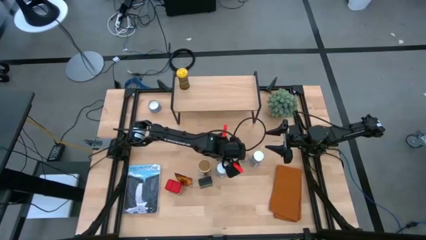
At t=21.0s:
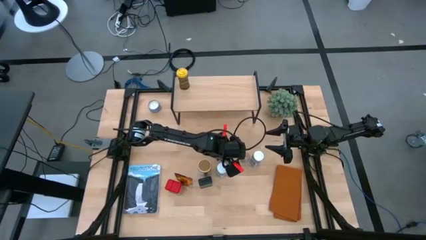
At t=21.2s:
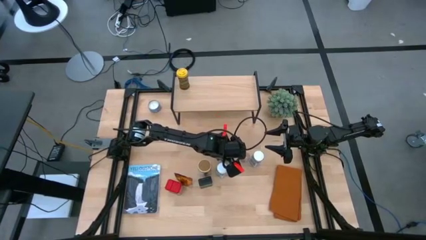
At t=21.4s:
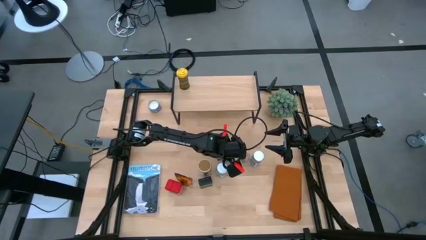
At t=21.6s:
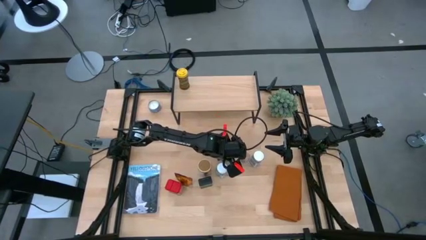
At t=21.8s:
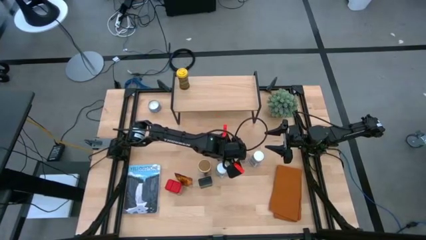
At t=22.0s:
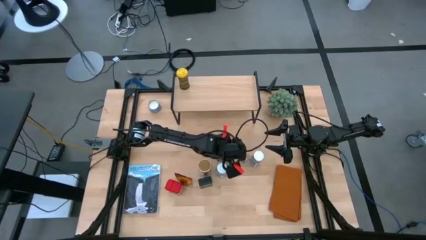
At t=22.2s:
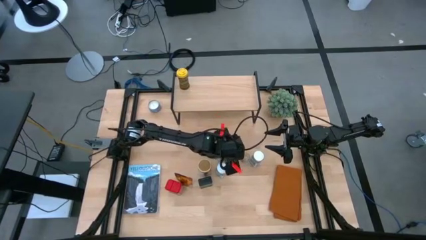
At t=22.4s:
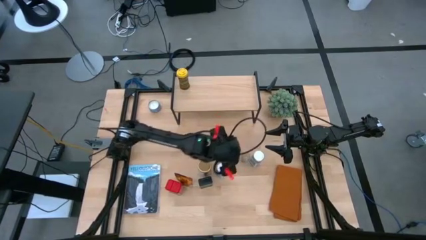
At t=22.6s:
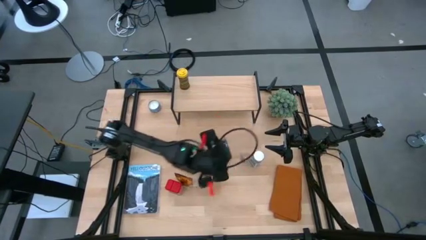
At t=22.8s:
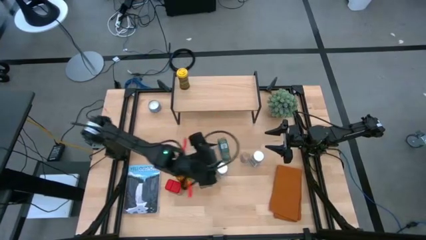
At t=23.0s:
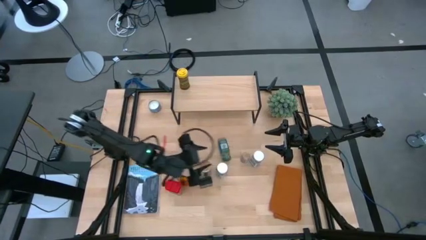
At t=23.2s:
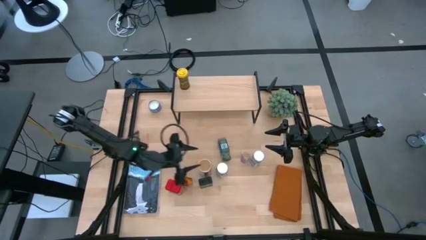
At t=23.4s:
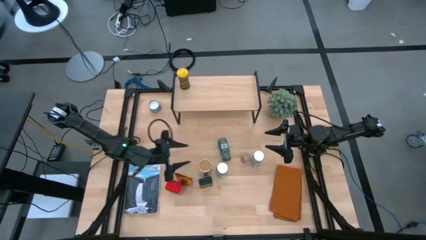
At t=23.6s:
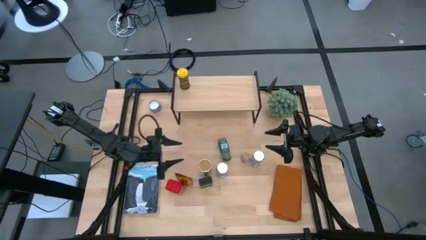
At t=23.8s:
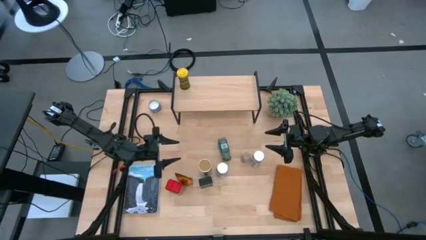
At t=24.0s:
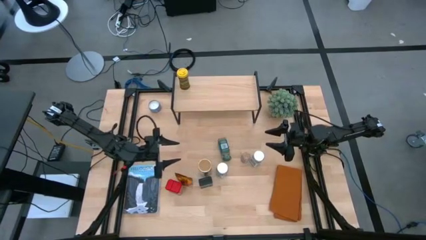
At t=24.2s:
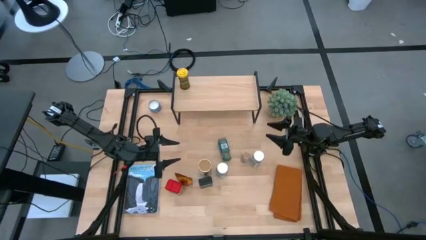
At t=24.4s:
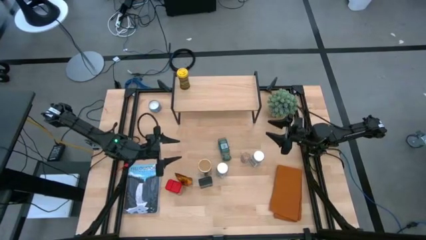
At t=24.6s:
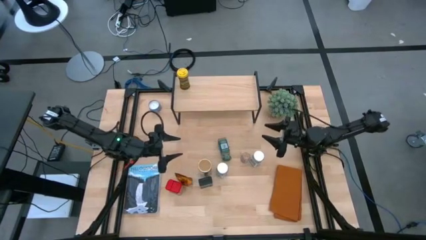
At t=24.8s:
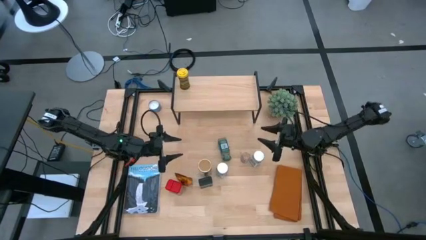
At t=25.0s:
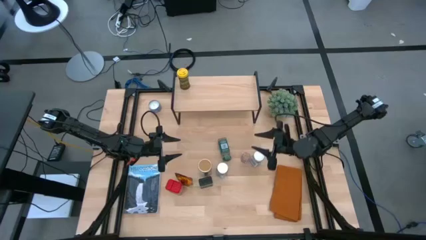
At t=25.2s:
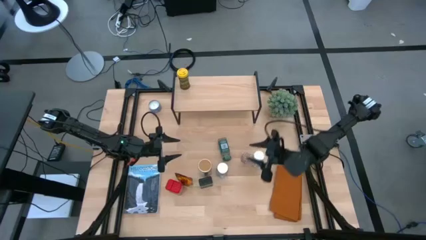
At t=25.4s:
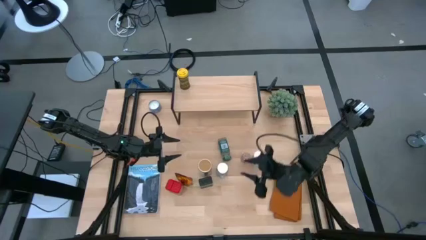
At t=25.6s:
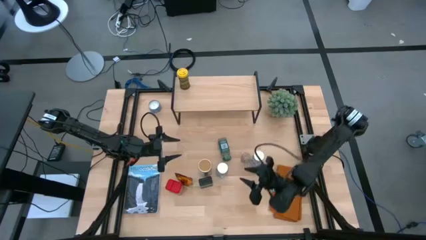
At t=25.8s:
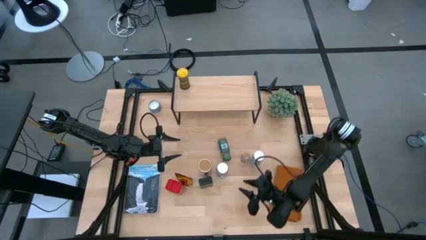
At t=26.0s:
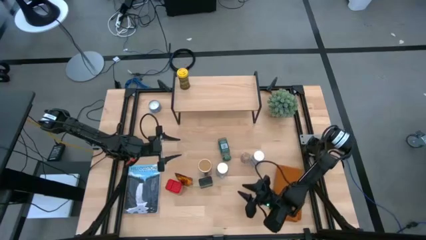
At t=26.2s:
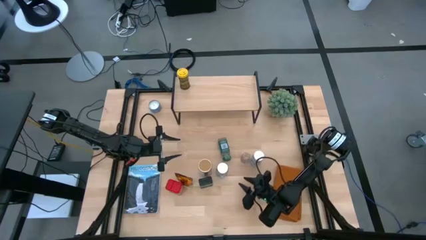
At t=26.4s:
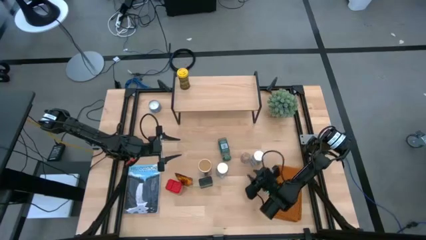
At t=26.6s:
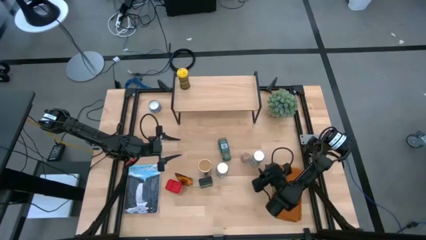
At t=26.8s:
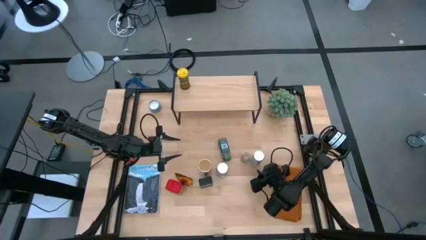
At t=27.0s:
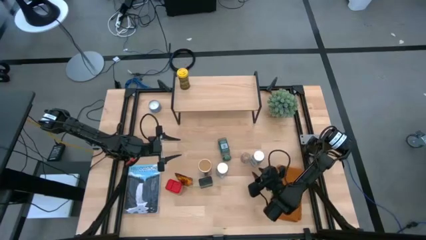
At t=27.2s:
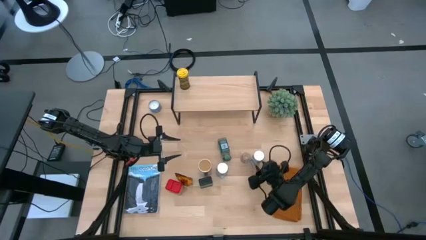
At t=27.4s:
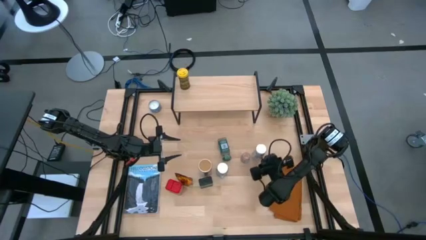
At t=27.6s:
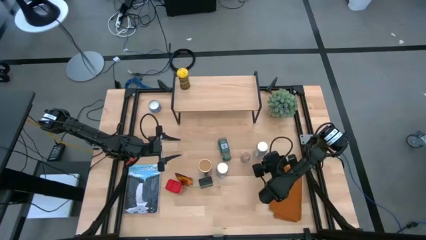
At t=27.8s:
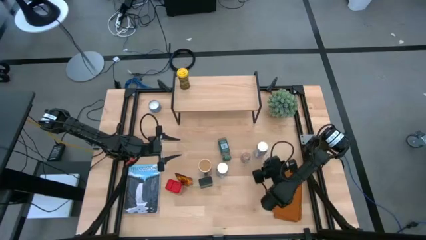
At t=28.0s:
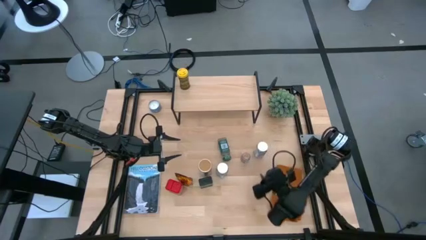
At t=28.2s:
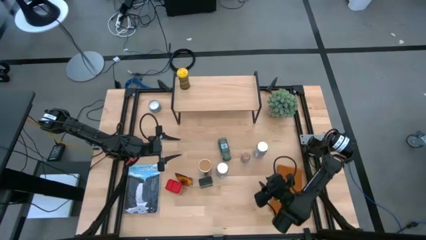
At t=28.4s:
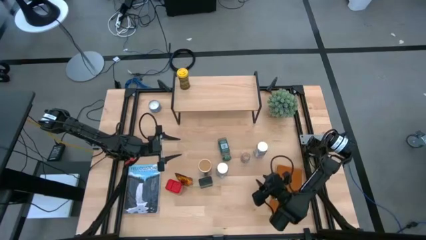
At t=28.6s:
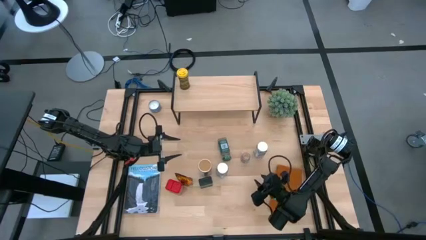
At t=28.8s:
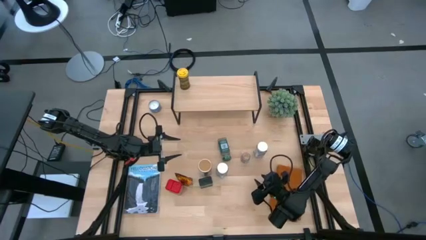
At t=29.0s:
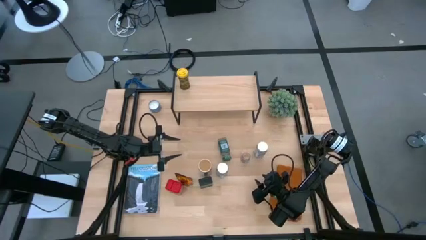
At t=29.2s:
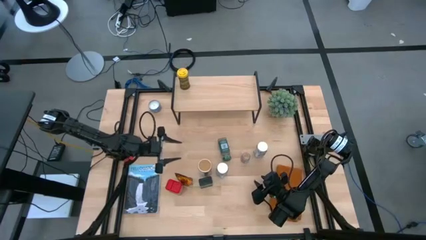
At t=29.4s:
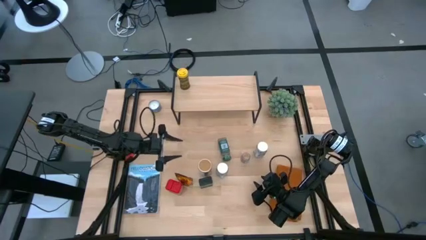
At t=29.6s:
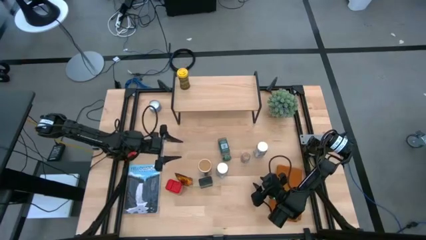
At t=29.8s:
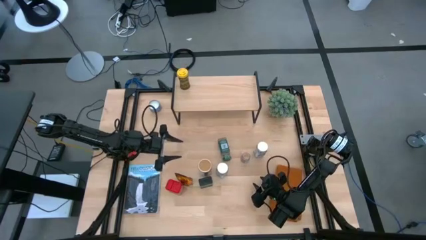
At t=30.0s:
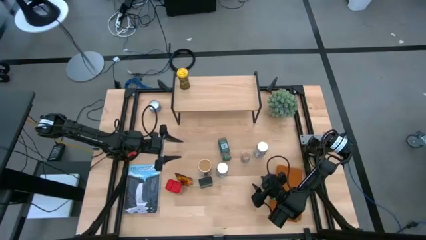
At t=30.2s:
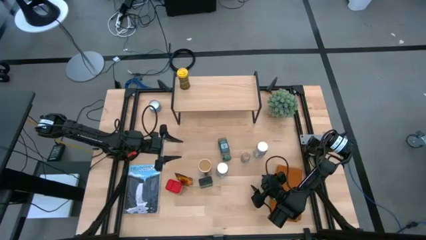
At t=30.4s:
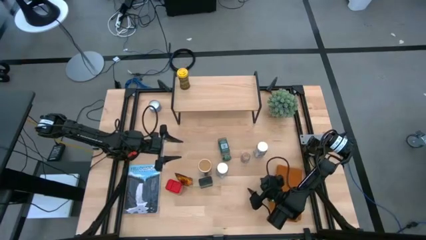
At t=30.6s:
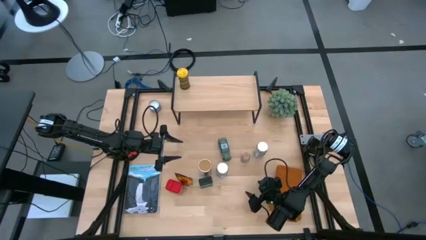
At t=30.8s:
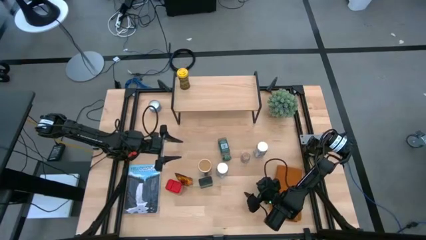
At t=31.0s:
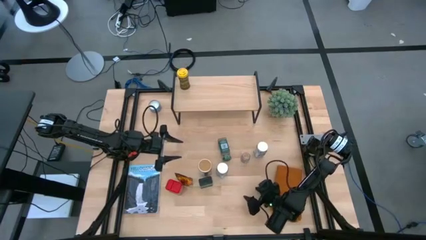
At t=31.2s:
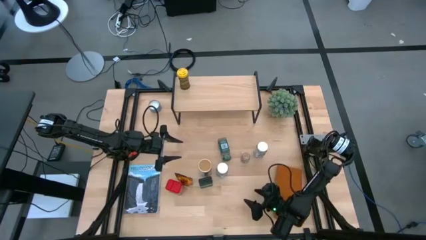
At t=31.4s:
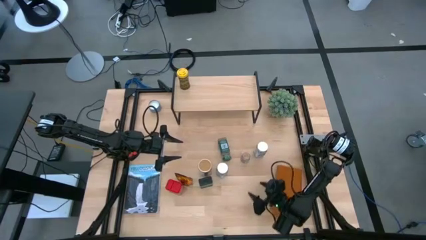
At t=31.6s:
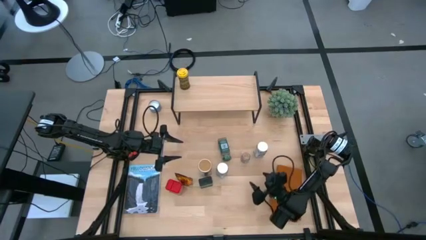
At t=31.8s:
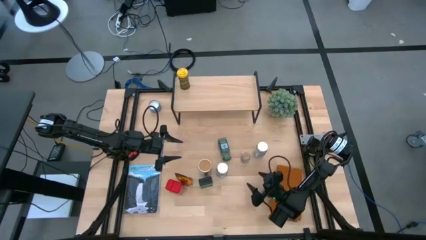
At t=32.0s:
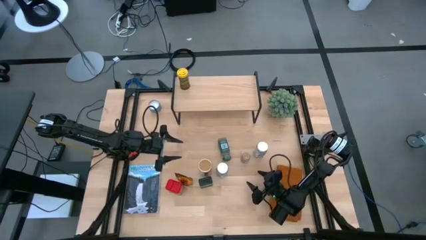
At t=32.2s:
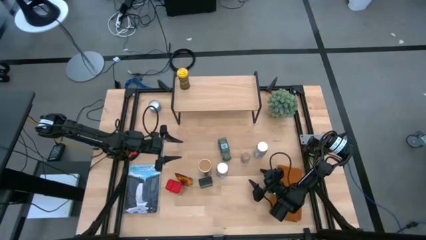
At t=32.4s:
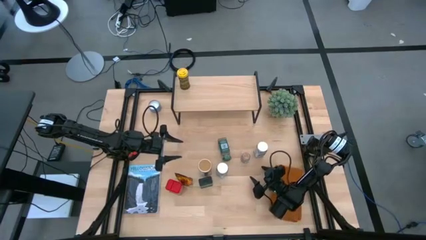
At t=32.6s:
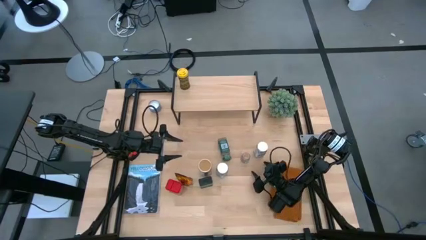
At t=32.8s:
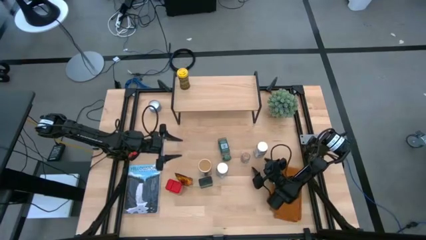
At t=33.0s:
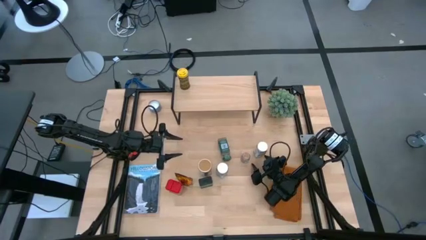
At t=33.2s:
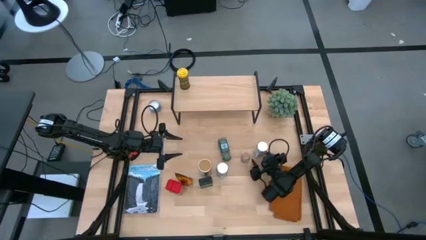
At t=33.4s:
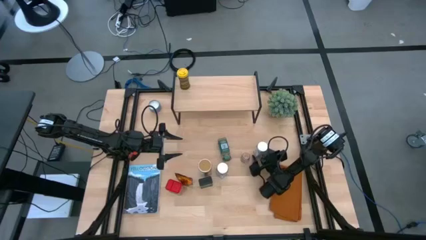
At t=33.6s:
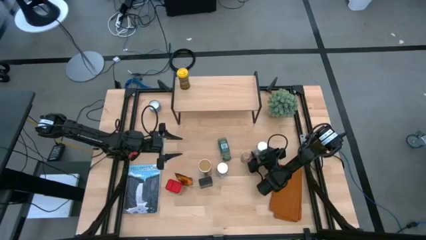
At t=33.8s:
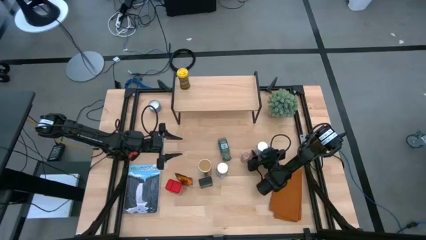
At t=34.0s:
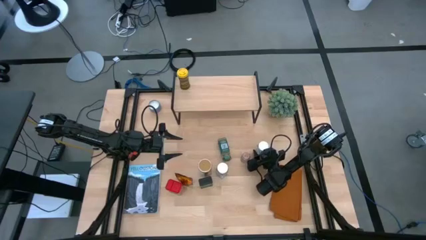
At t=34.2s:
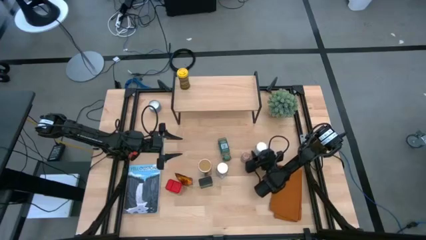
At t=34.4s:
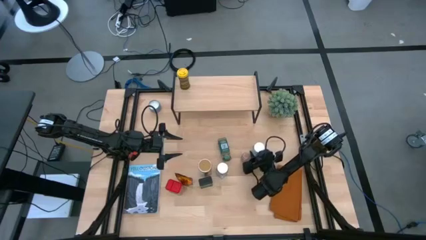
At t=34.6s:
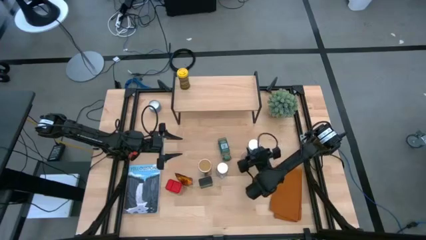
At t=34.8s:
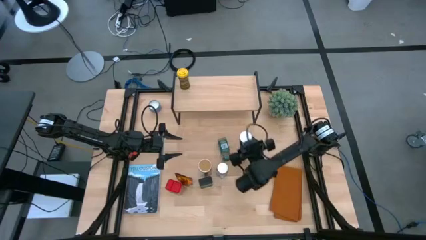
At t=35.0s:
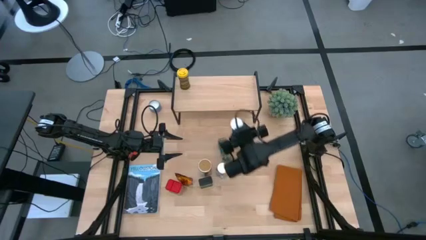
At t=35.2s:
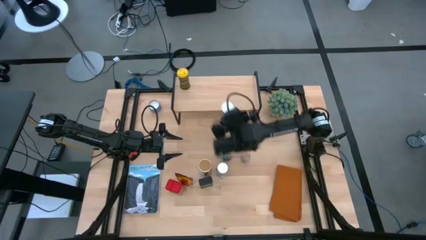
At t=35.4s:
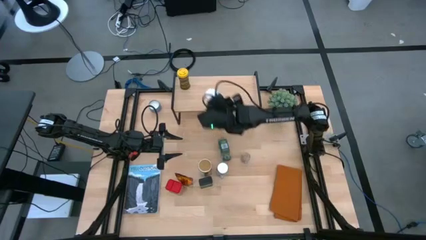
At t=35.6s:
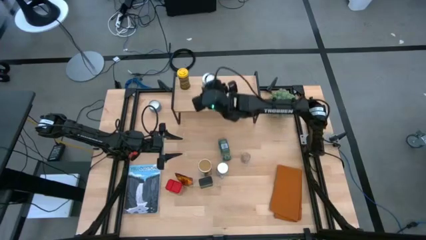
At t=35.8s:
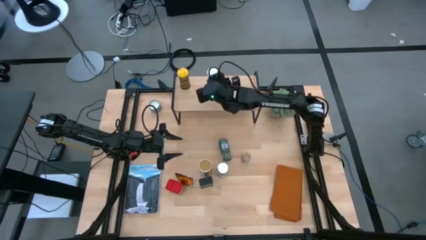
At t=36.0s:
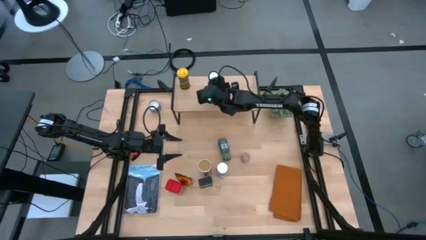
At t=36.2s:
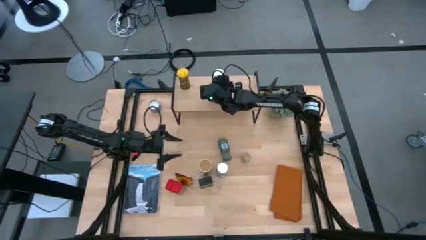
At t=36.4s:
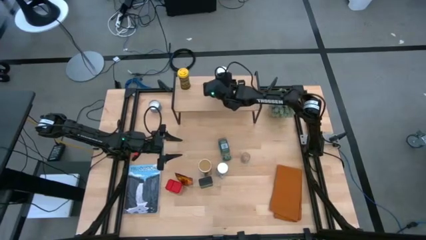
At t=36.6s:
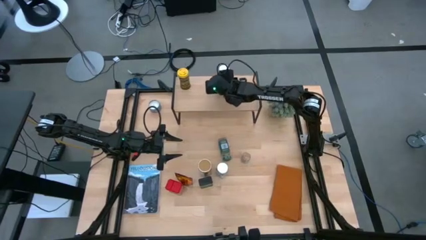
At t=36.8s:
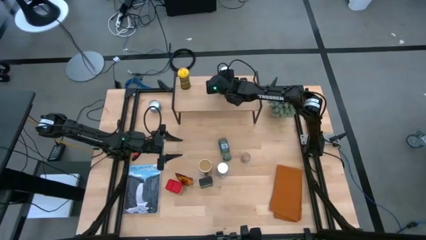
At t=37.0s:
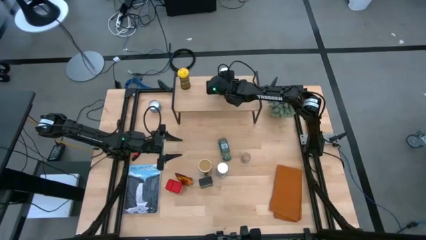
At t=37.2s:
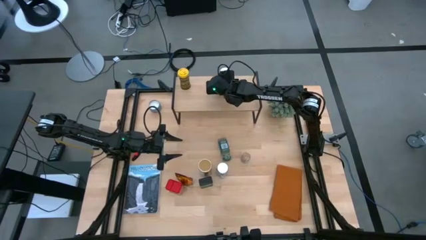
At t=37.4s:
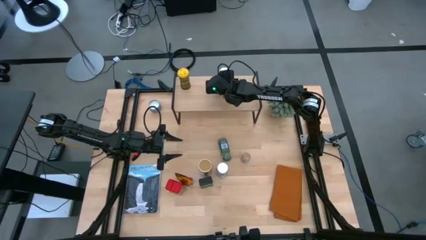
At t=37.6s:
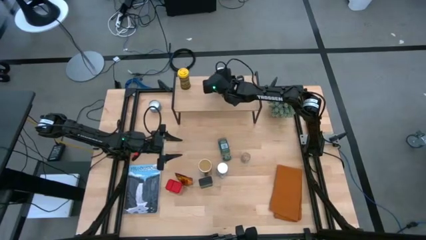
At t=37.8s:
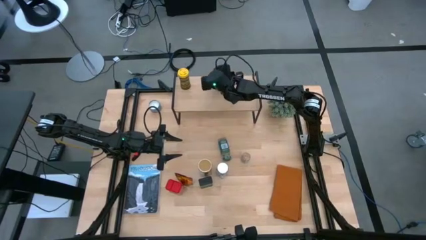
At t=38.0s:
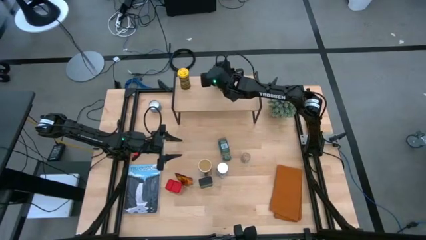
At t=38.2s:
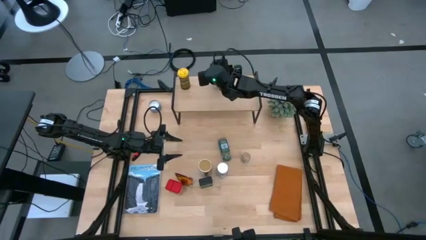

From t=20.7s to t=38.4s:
Task: Shelf spices
Put the right white bottle seasoning on the shelf
